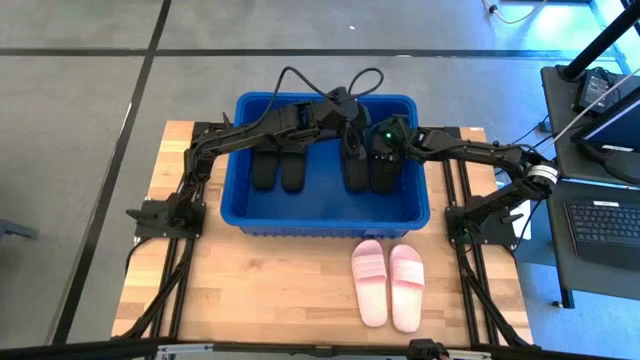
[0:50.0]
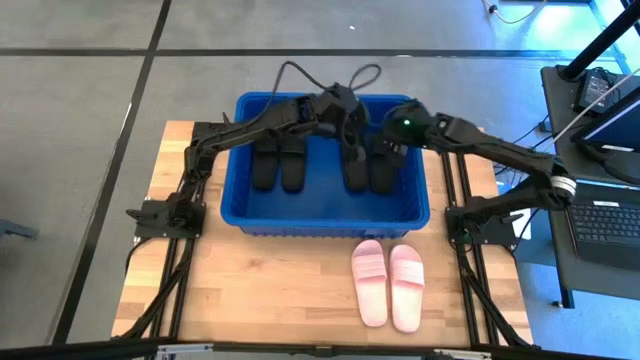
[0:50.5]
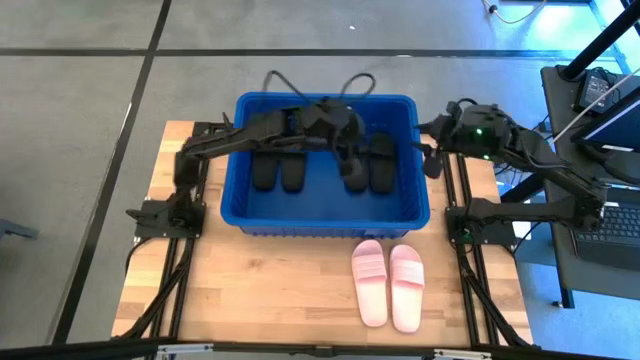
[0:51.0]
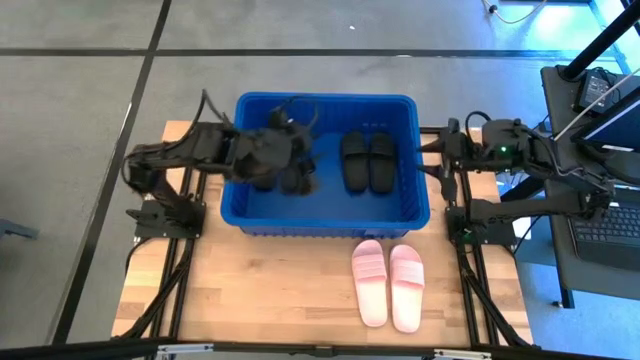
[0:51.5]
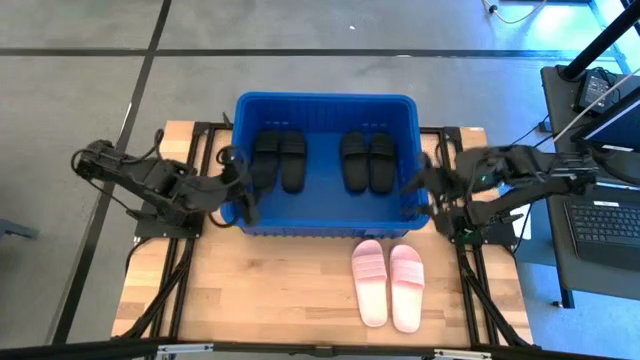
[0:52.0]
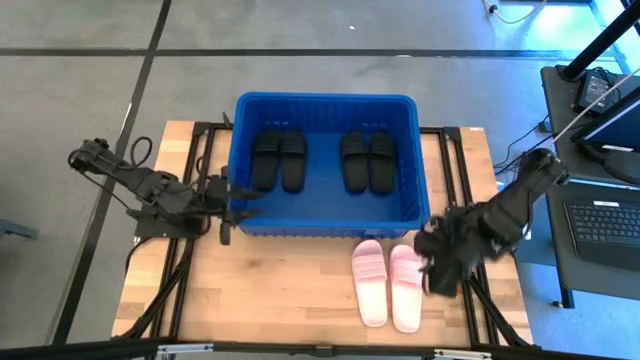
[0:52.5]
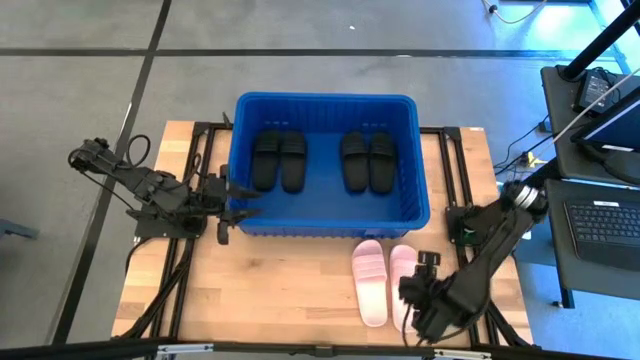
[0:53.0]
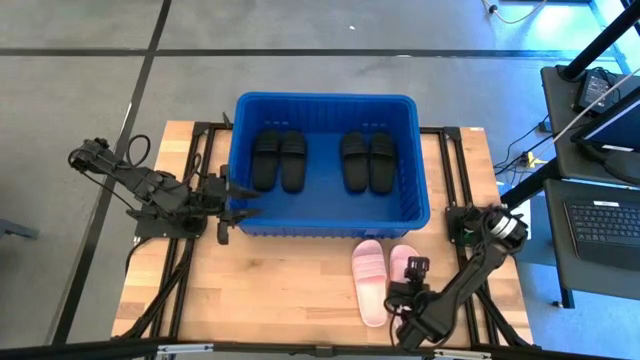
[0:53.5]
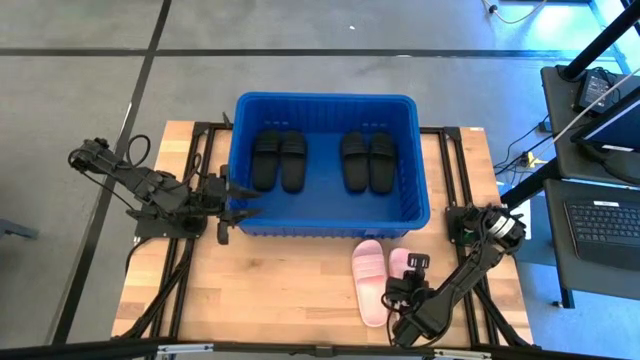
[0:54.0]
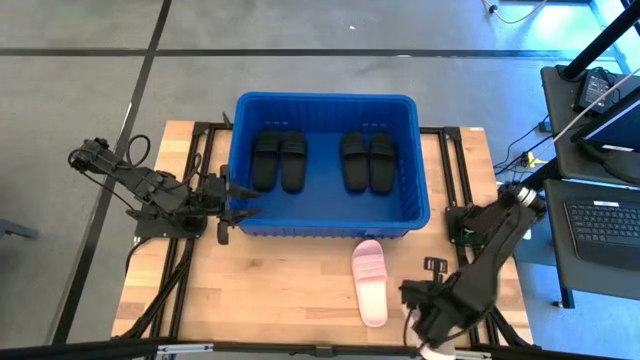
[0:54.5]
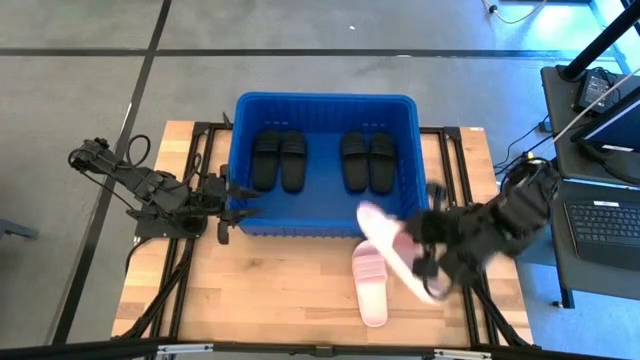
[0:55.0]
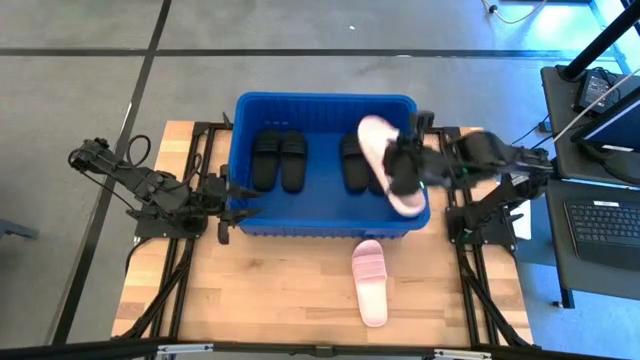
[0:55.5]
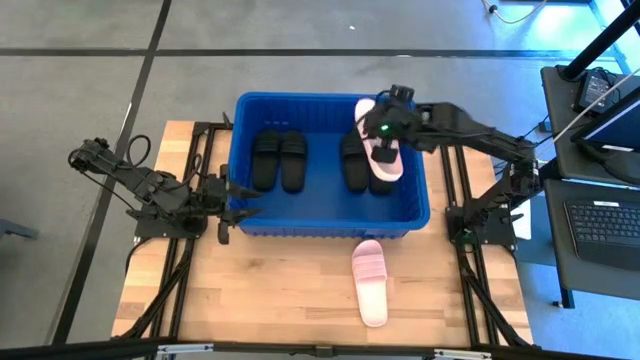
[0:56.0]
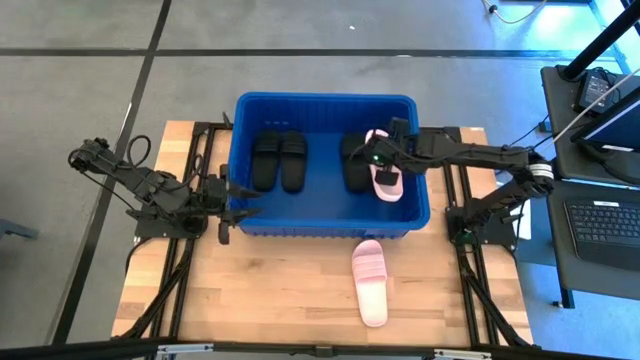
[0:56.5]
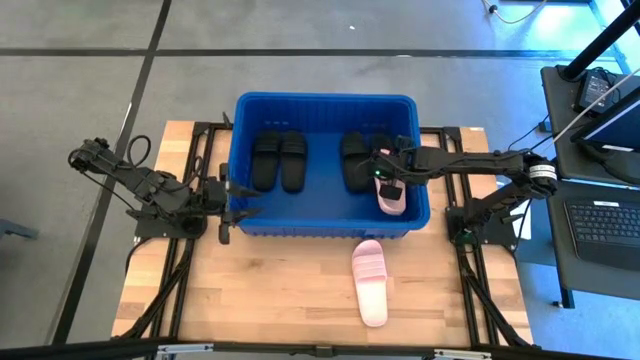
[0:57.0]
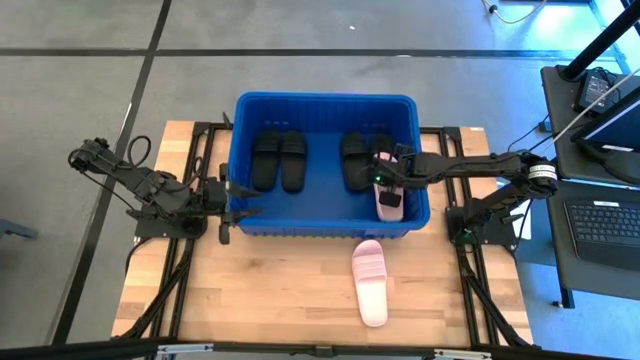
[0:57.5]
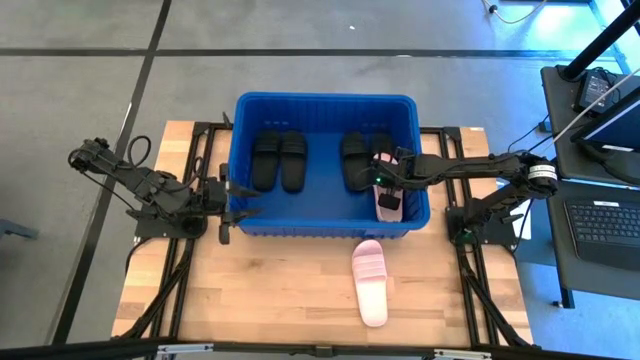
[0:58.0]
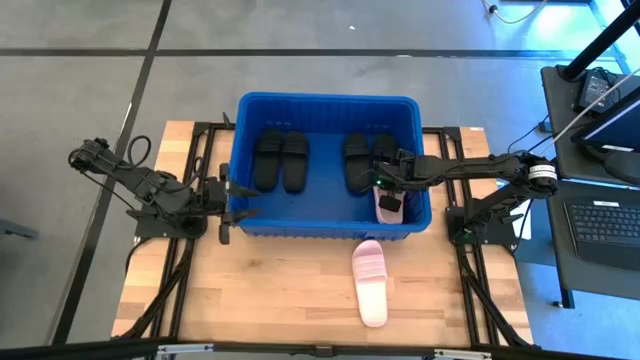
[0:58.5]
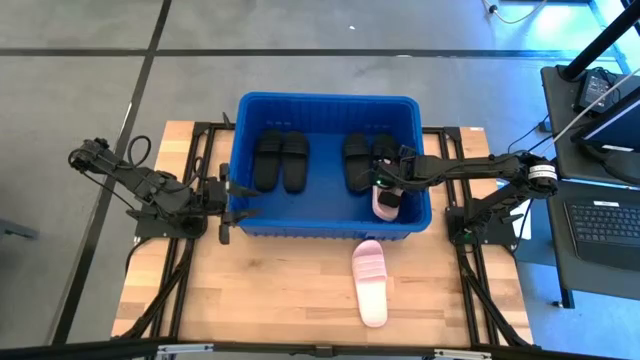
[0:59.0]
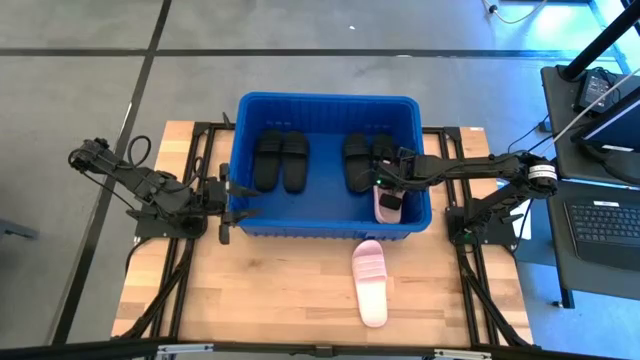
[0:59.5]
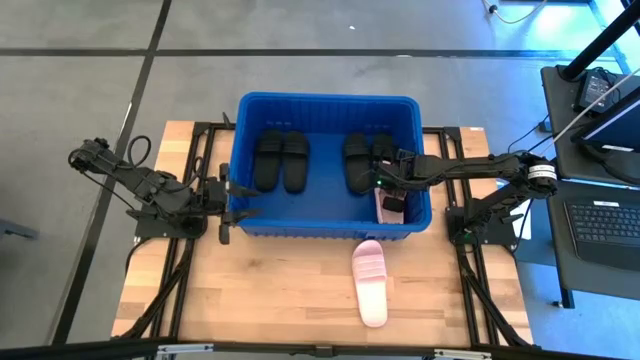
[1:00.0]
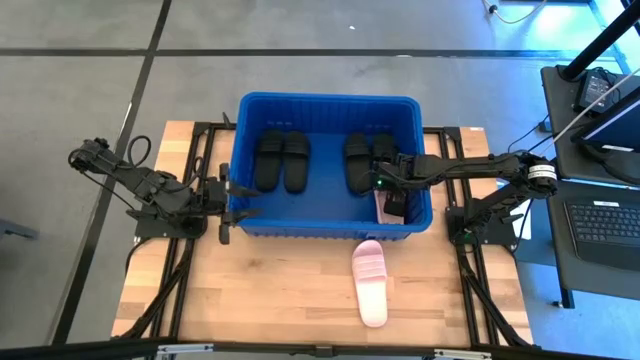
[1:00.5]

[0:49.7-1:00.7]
Task: Pick and place slides into bin
Put the pink slide into the blue bin

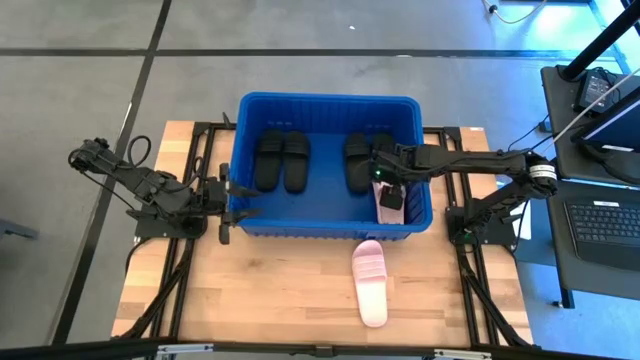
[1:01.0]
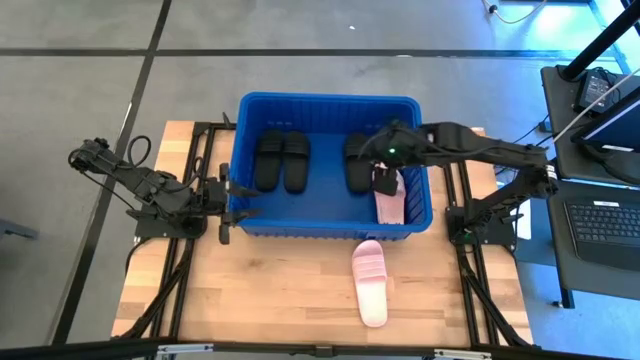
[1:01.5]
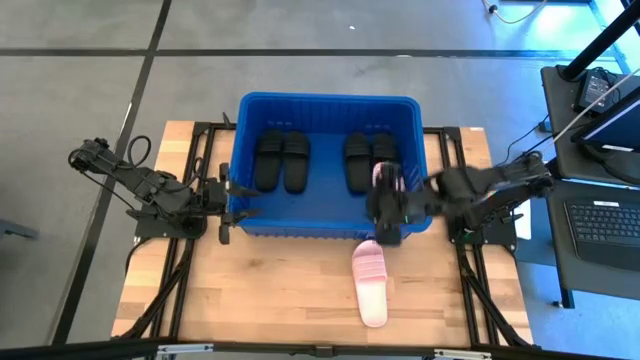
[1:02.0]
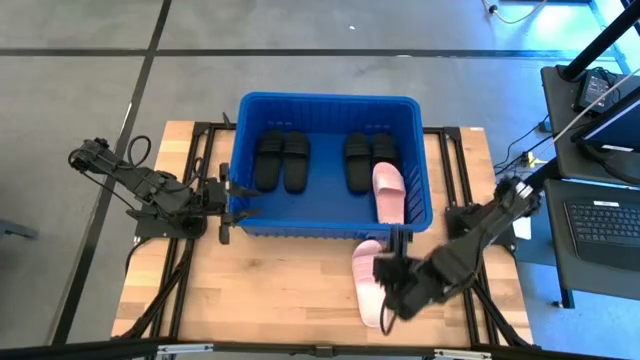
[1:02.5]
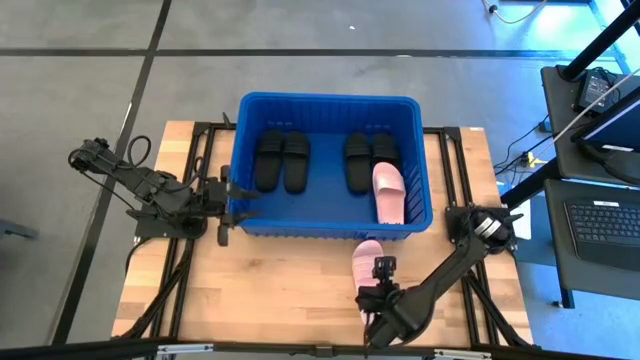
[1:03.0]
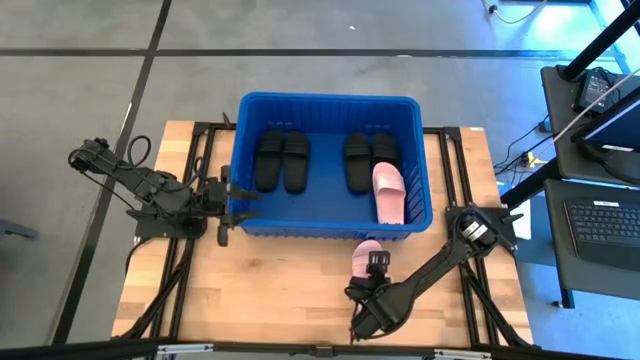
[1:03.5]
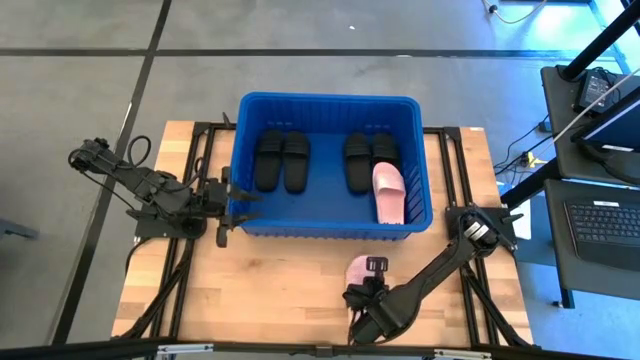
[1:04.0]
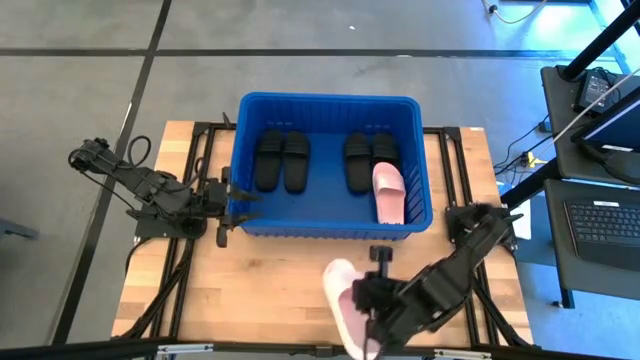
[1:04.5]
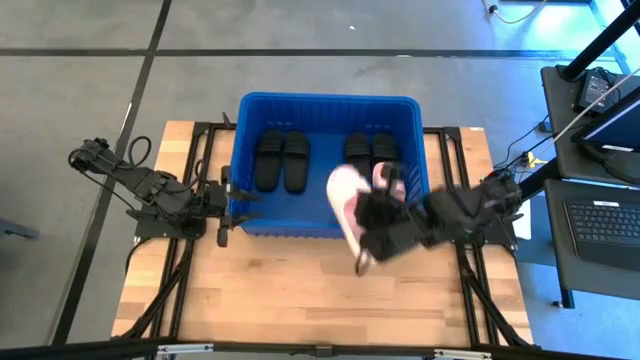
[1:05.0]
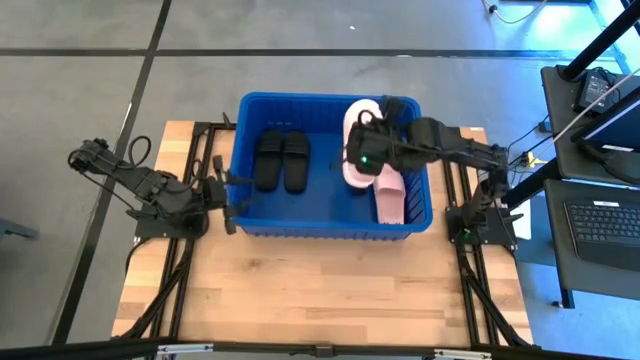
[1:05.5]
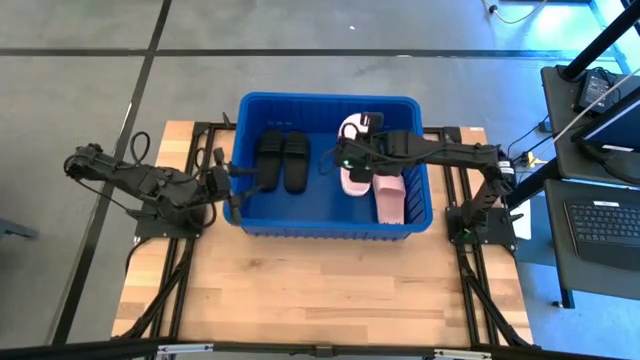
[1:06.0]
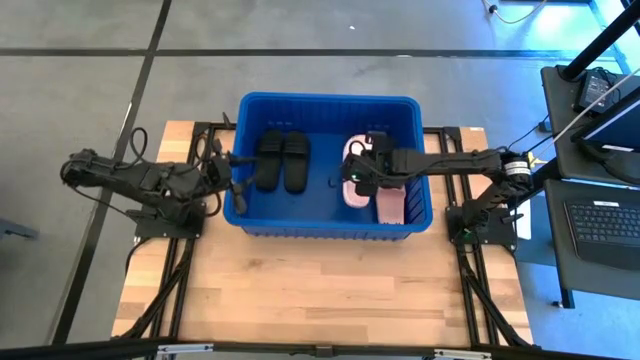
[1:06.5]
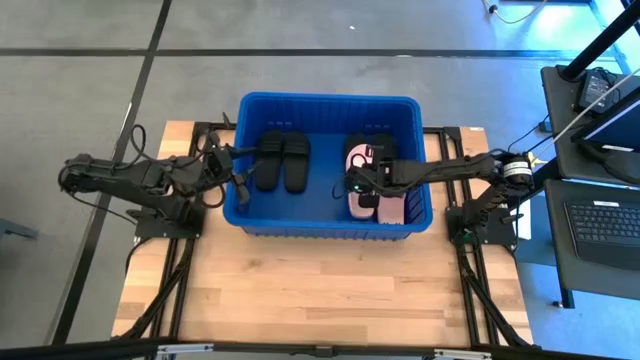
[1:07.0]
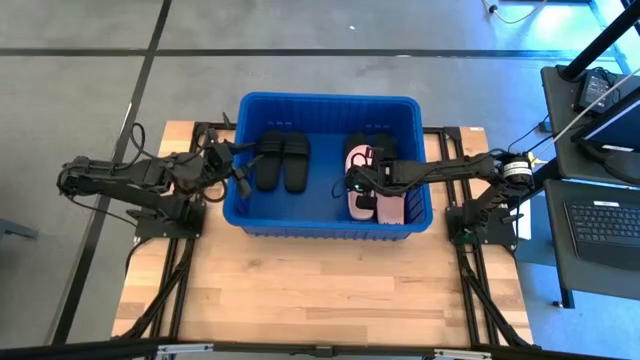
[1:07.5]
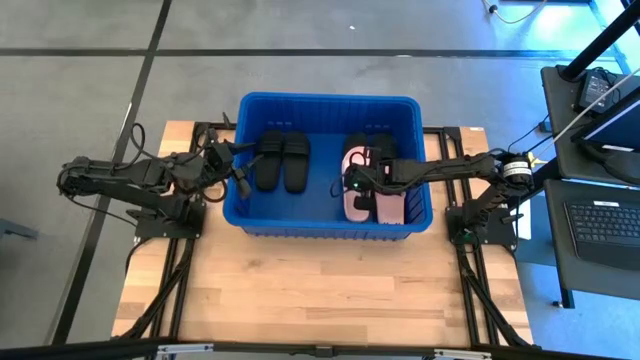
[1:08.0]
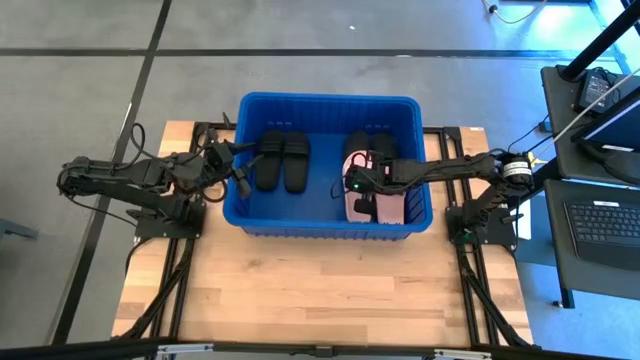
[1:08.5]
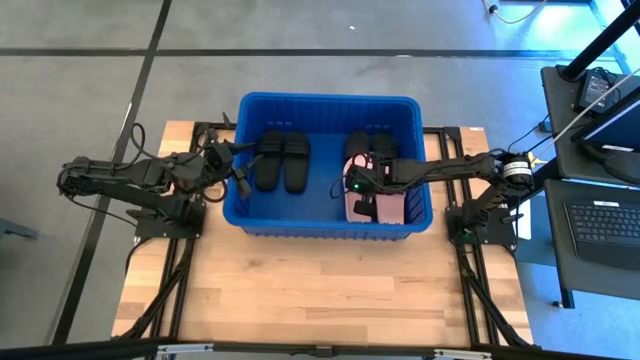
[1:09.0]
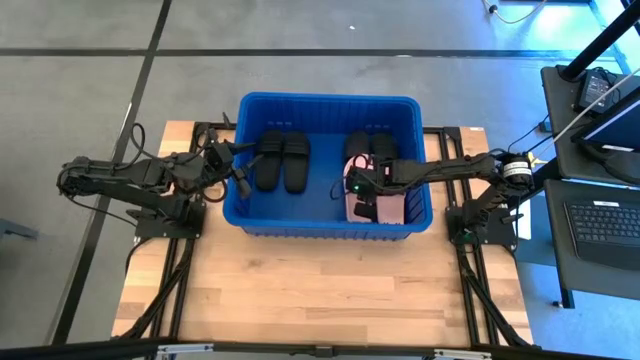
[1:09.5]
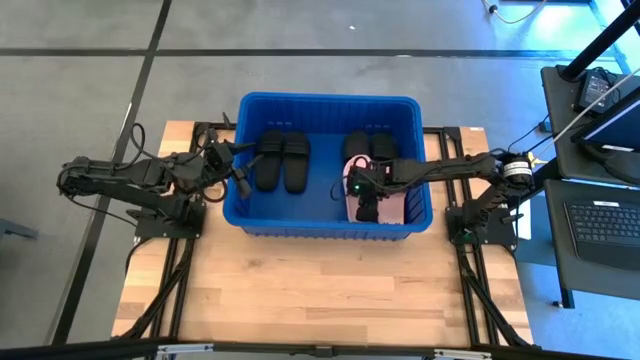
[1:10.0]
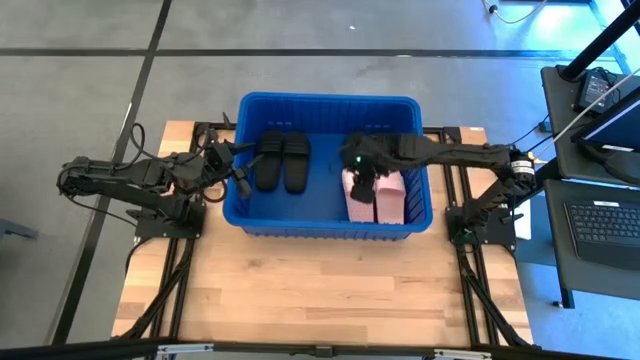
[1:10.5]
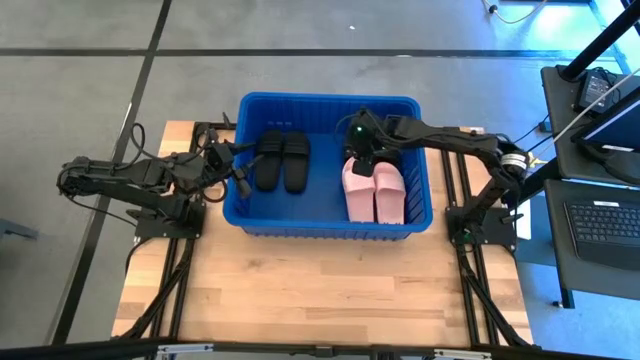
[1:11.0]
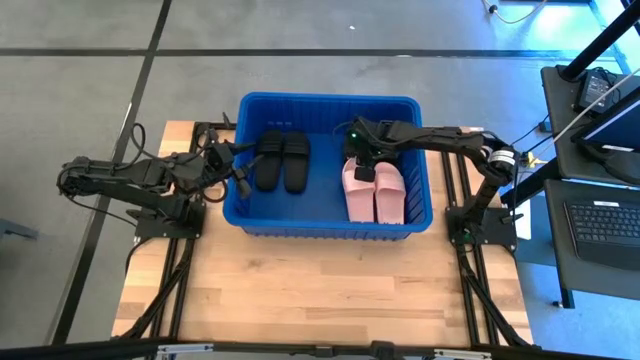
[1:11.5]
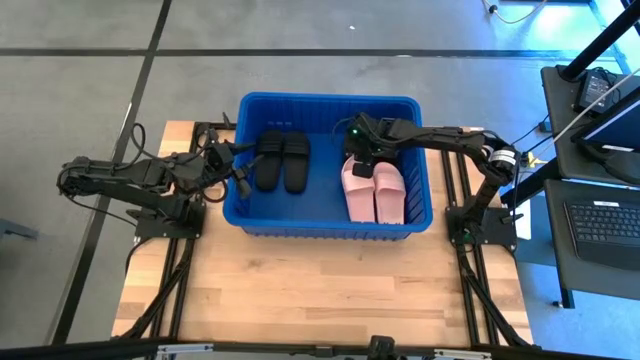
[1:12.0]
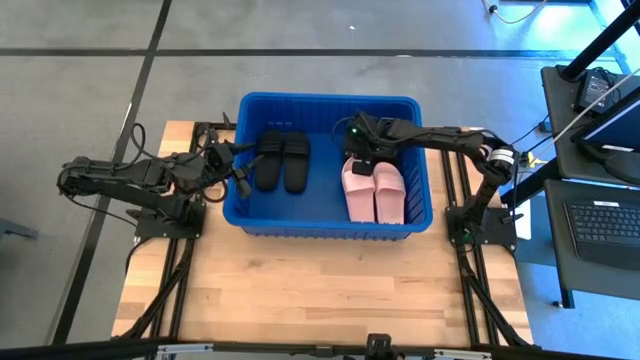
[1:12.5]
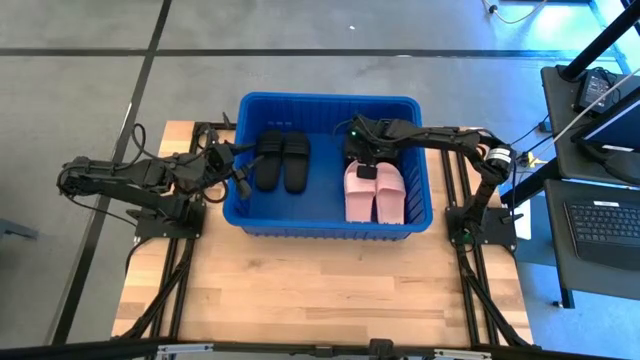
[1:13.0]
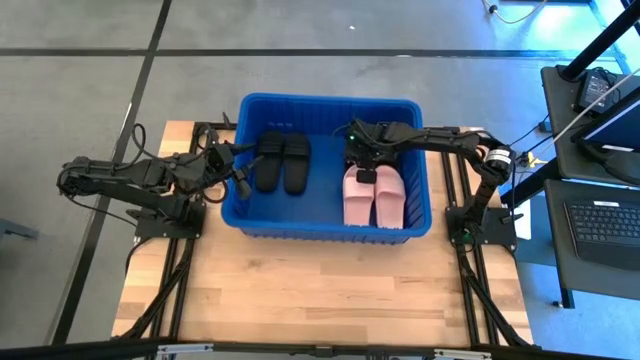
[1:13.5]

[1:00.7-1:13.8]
Put the pink slide into the blue bin
